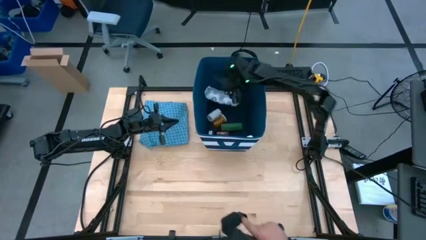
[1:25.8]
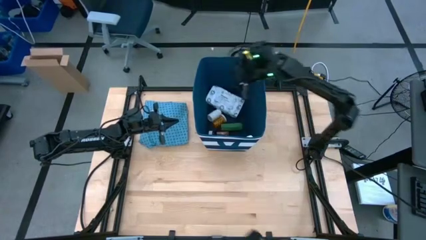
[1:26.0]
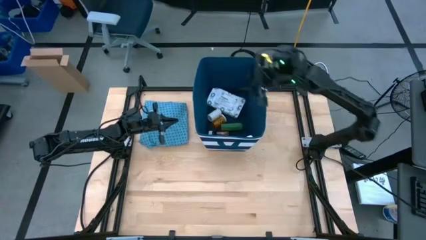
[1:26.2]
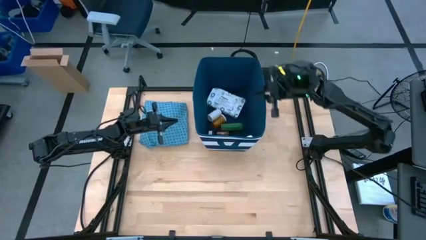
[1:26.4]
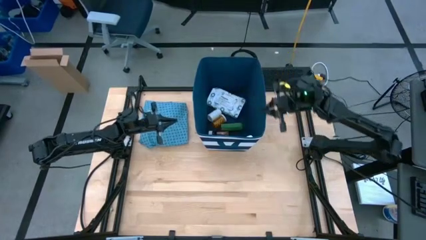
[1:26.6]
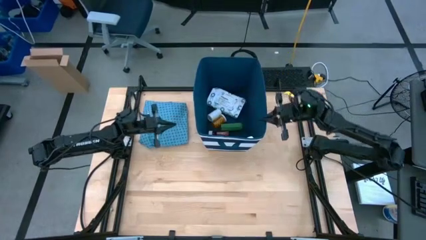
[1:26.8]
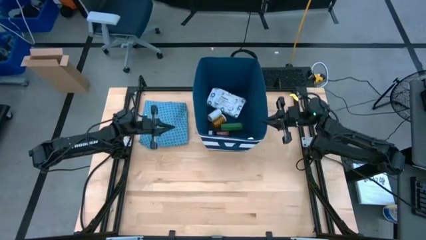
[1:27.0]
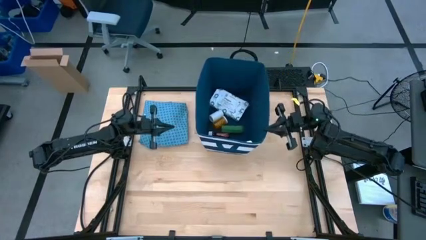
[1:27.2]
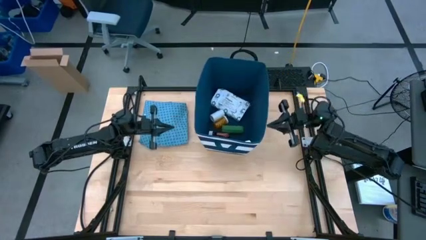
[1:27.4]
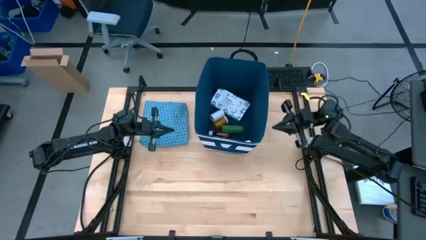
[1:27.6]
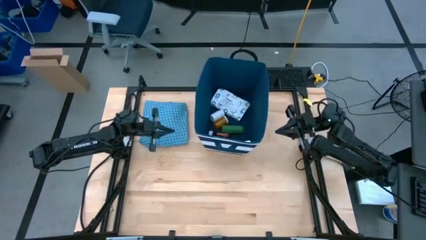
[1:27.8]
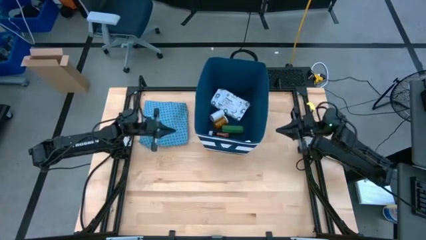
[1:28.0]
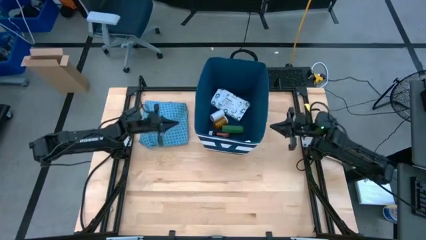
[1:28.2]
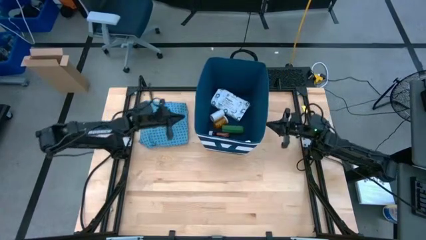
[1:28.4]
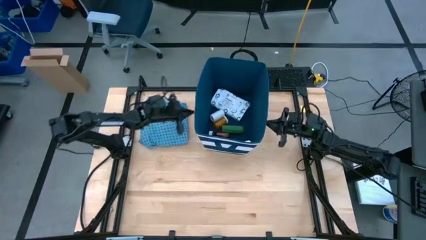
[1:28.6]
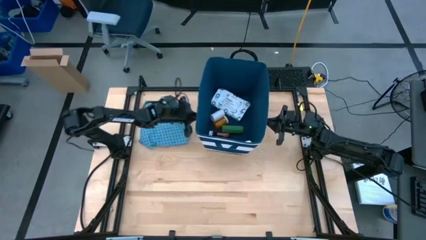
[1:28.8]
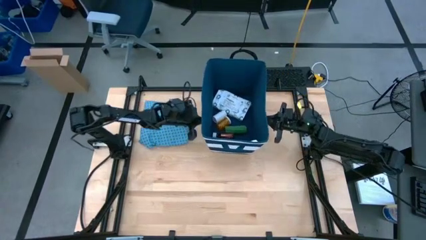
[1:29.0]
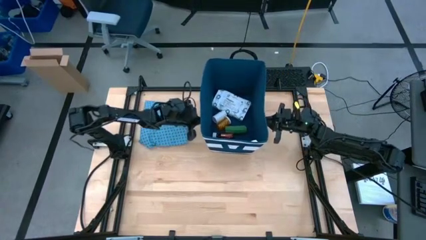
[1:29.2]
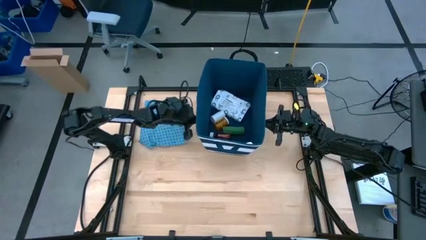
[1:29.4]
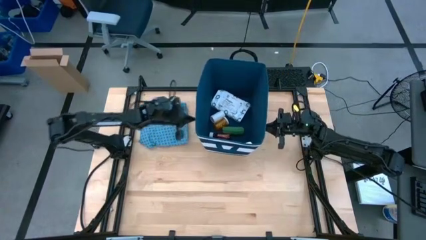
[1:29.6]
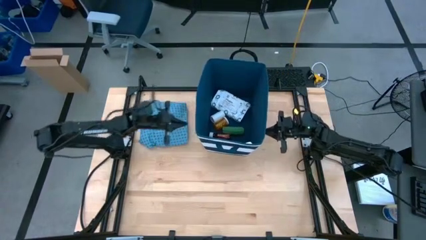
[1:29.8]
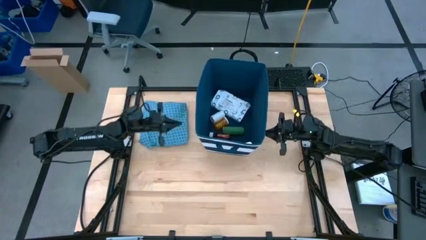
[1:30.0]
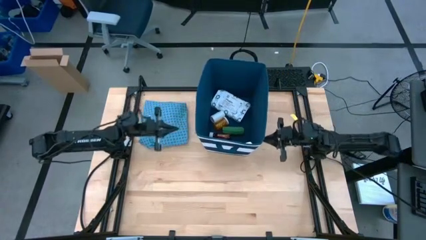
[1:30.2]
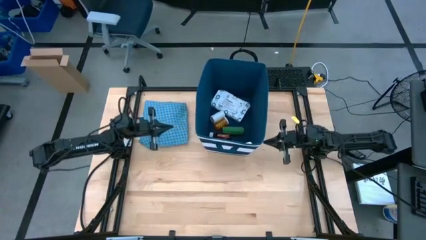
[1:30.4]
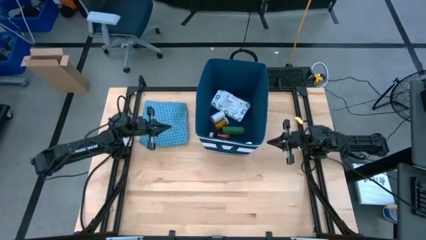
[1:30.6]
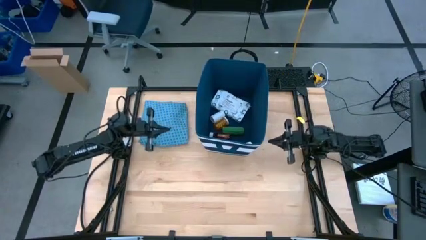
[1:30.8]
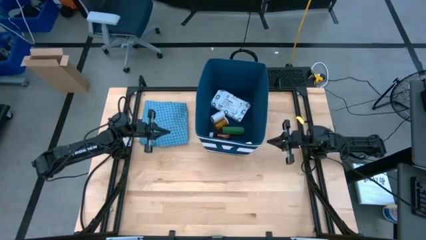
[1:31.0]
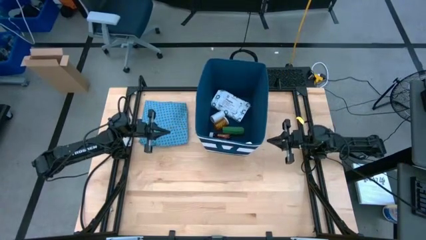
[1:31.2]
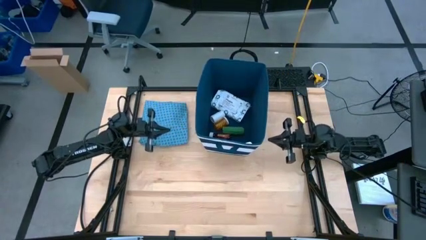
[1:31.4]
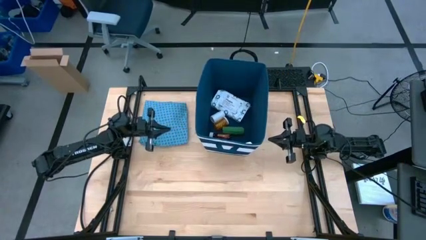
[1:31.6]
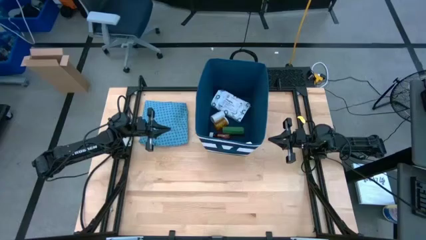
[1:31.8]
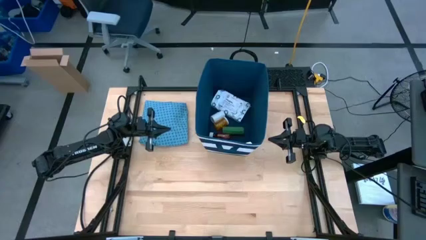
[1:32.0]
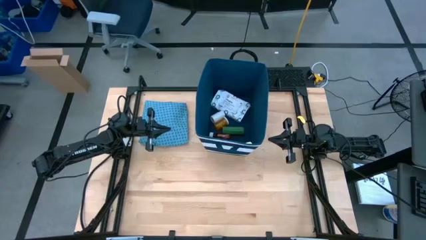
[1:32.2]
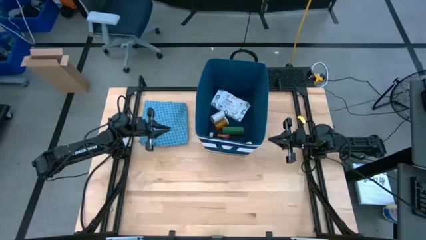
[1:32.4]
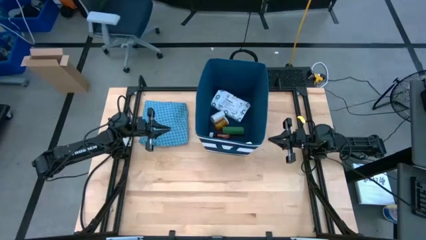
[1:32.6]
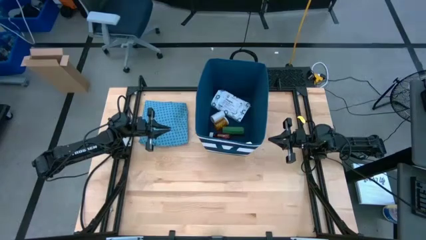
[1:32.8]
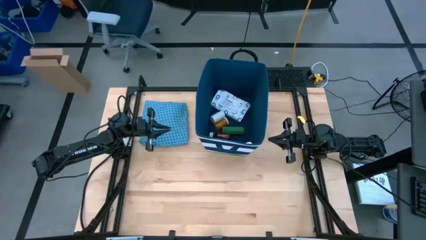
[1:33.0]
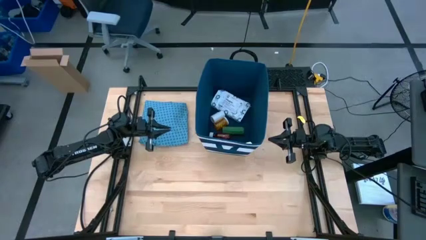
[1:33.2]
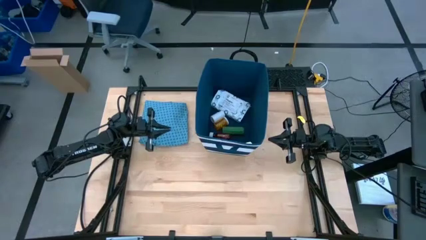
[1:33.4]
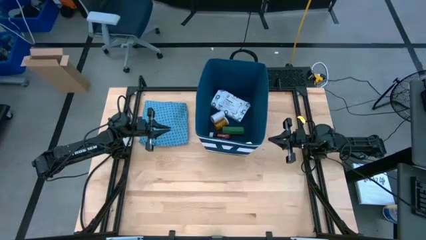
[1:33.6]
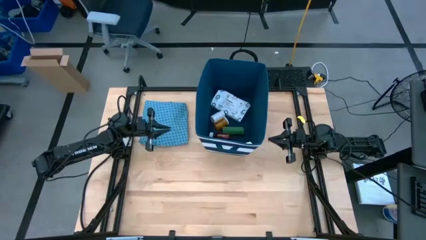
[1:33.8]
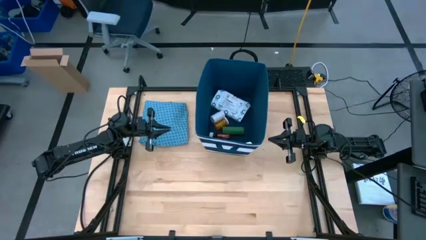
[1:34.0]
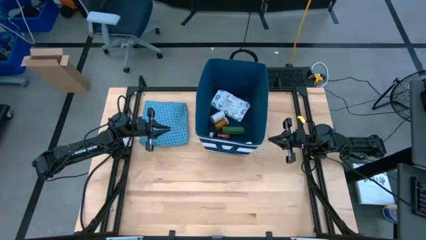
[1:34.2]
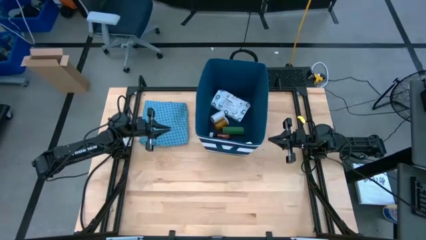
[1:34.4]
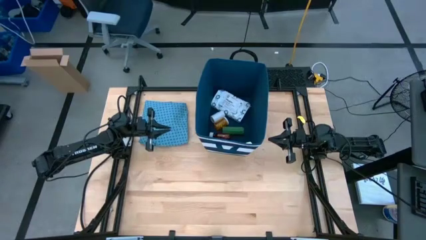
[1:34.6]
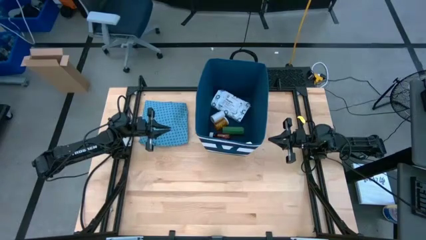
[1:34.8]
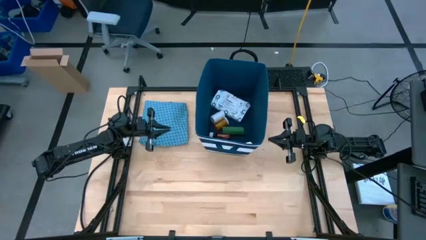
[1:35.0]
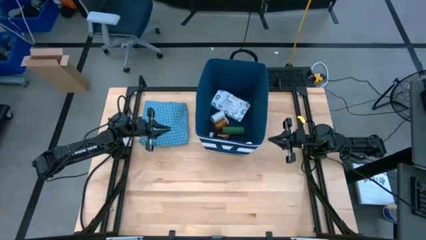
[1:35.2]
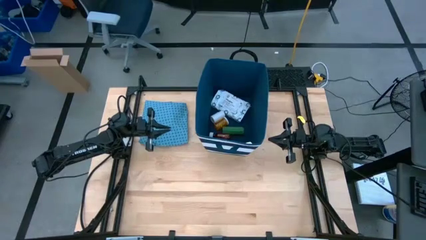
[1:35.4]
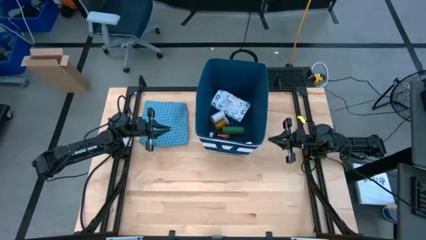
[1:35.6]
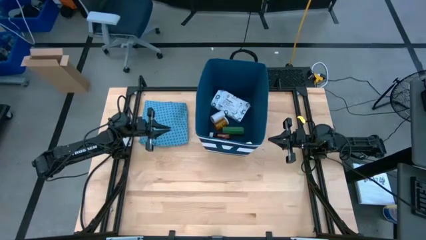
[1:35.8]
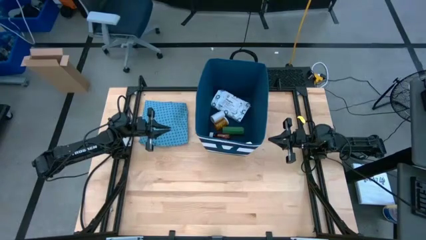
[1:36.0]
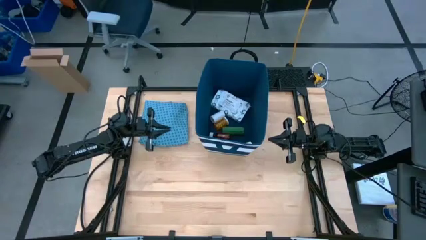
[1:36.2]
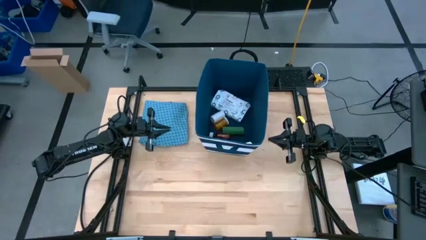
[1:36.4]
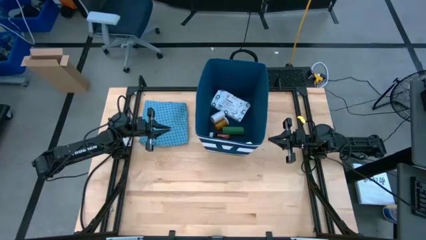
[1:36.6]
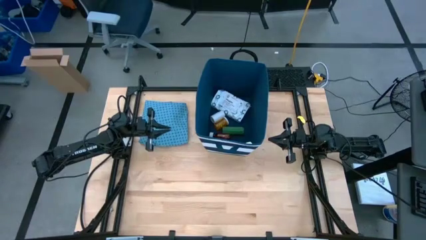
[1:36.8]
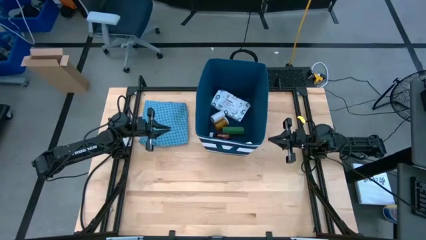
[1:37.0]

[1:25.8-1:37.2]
Task: Pick & place medical supplies in basket/bin
Return to Home Position
